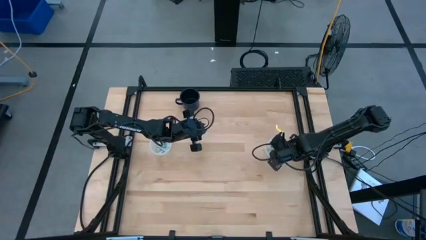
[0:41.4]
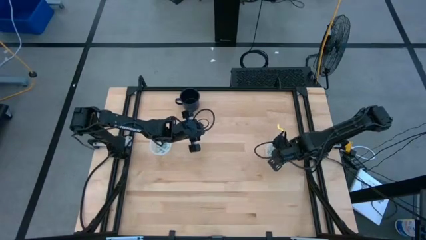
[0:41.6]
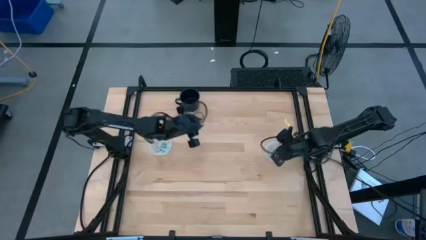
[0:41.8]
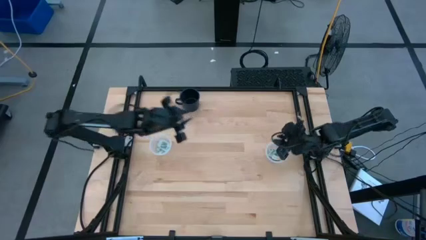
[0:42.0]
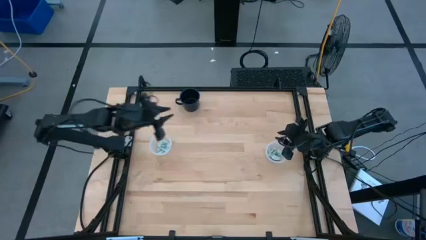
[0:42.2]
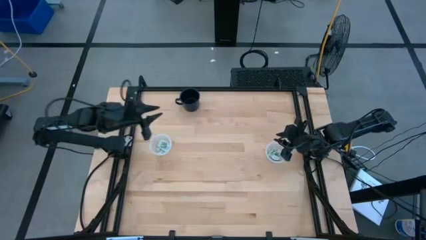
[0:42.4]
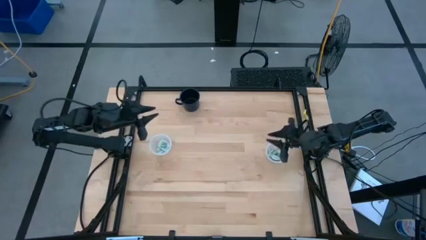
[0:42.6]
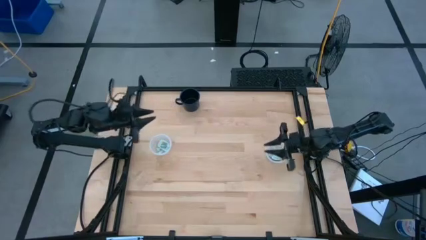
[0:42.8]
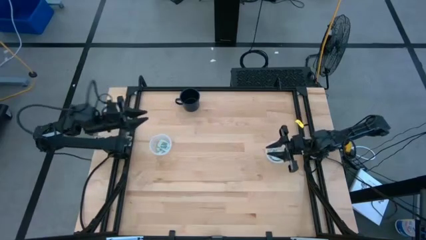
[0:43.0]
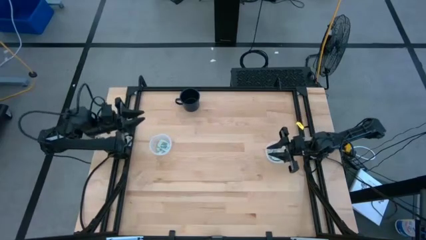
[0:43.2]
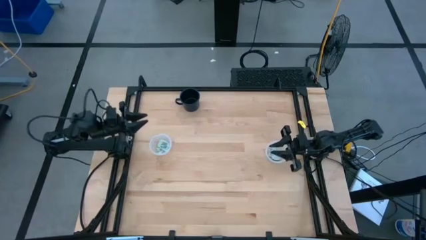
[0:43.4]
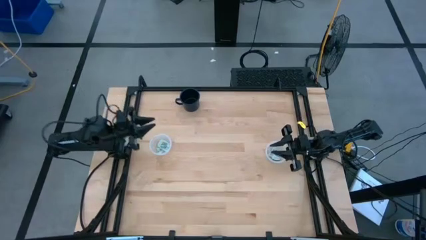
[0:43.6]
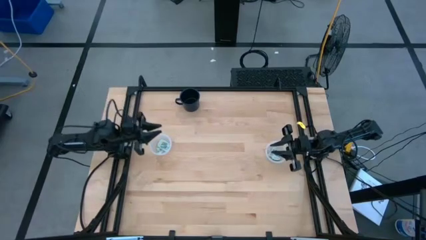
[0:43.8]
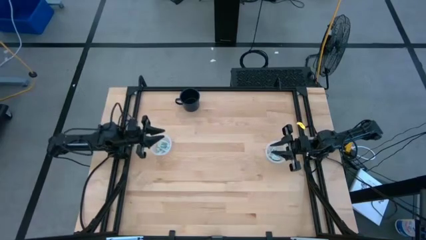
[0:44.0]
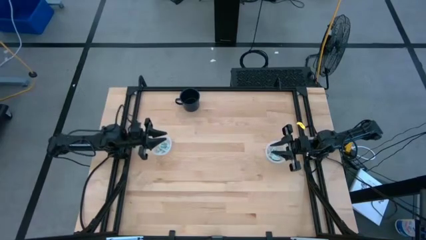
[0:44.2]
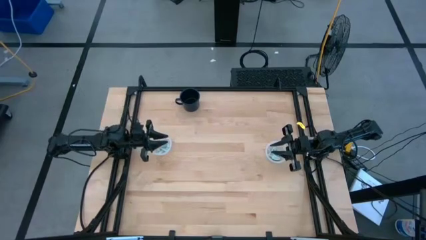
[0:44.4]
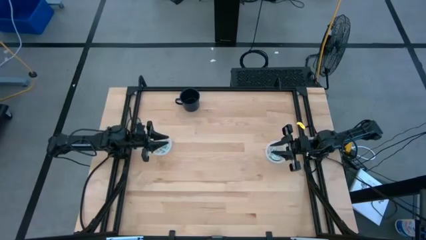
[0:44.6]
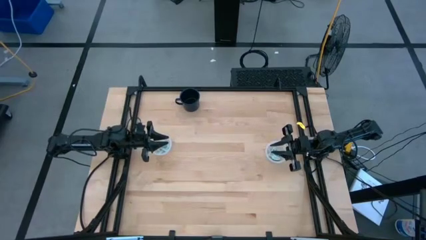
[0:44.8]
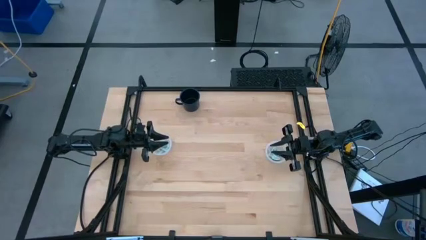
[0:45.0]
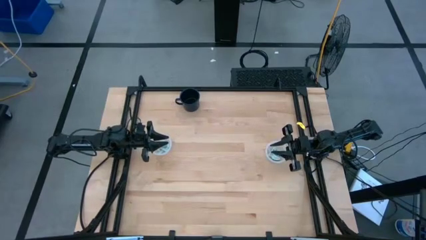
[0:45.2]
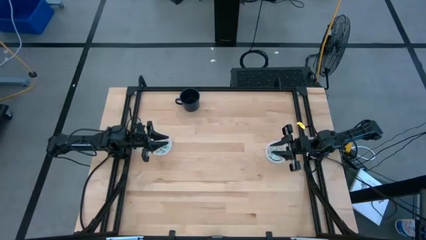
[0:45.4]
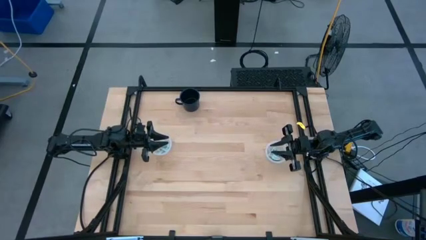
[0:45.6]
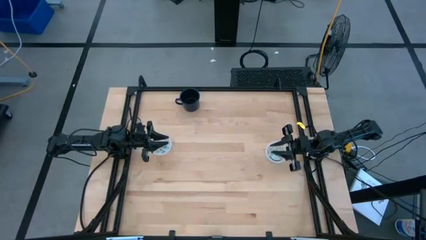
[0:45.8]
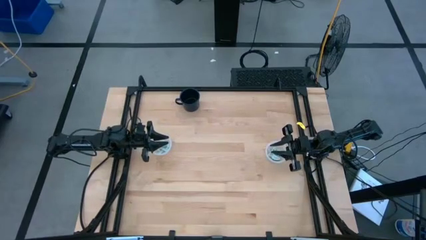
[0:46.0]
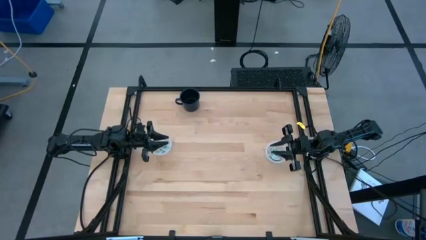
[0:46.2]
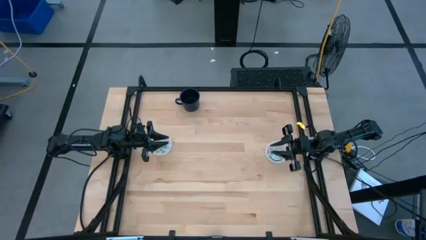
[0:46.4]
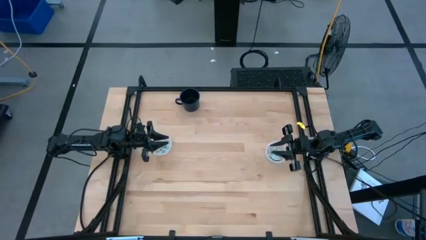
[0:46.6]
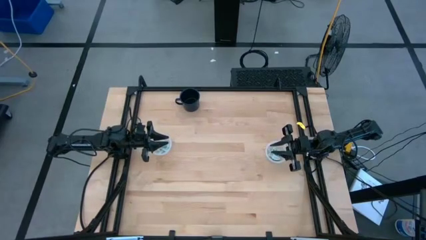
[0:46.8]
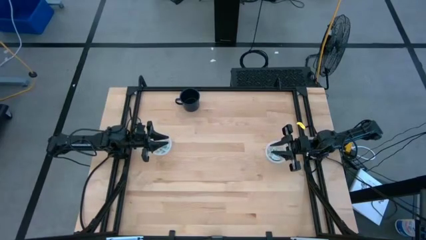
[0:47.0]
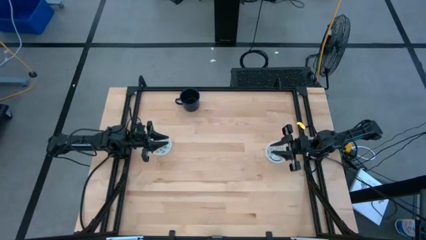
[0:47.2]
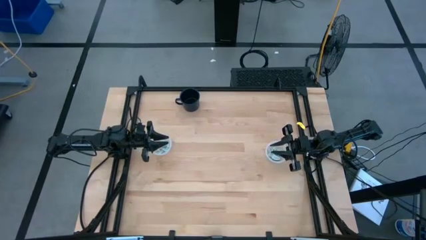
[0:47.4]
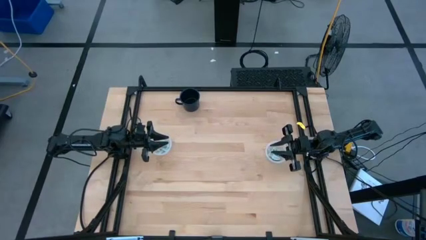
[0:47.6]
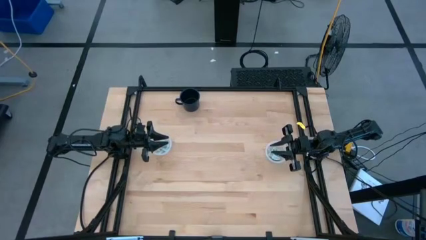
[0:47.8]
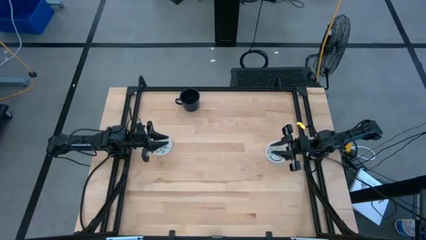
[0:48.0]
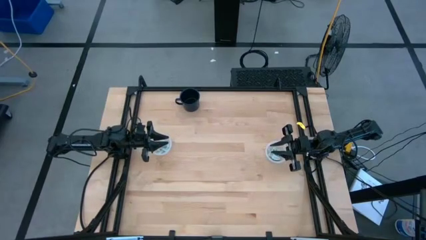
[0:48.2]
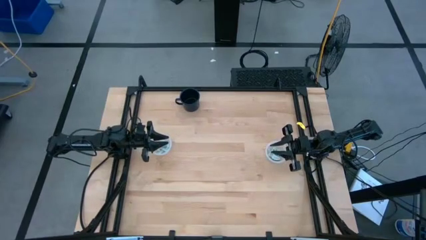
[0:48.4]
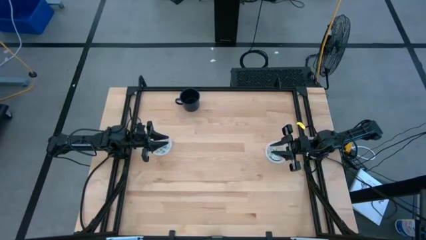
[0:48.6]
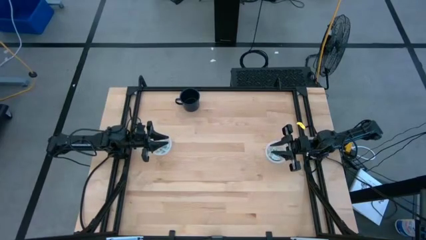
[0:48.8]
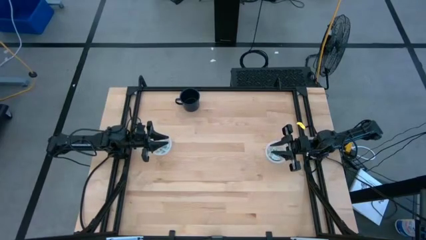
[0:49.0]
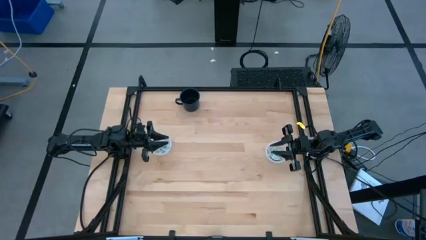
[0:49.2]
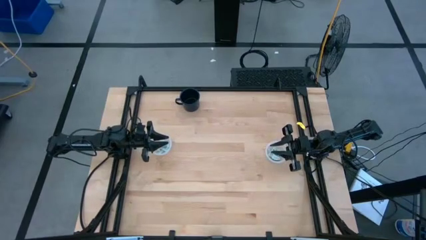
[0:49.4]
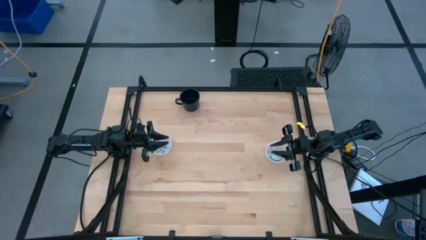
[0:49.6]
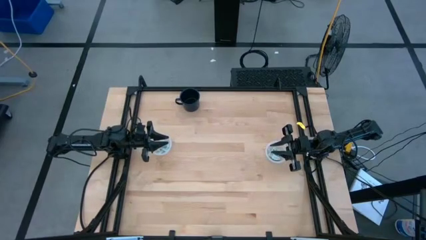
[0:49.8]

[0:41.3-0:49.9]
Task: Pick and place Stevia / Truvia into bins
Return to Home Position

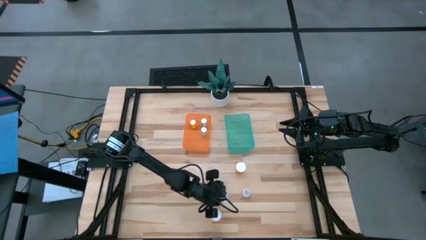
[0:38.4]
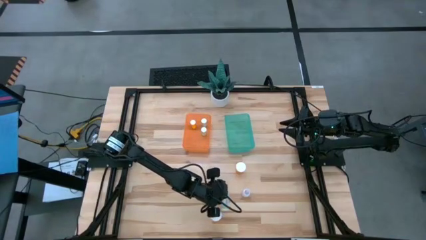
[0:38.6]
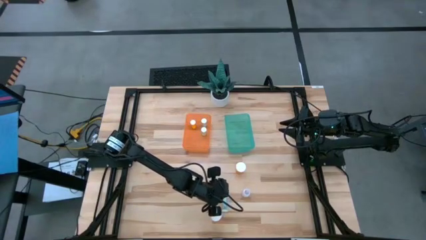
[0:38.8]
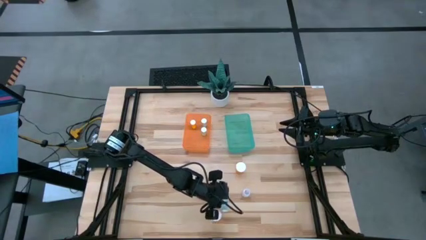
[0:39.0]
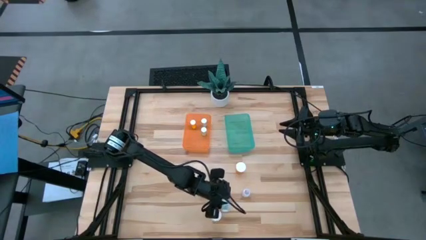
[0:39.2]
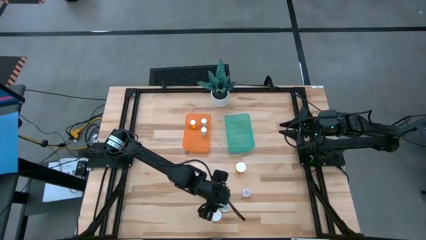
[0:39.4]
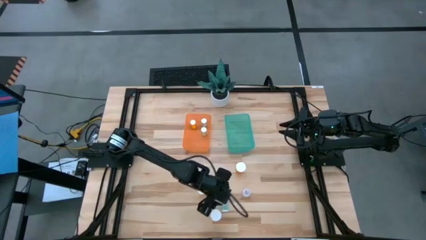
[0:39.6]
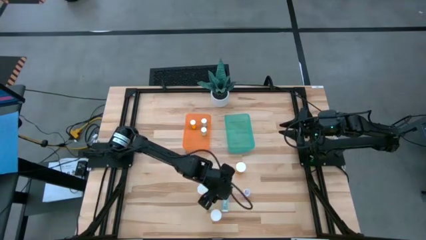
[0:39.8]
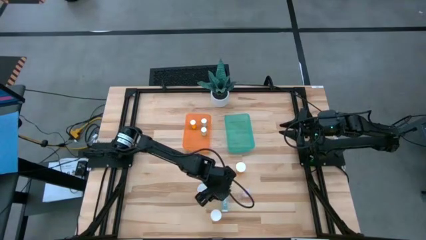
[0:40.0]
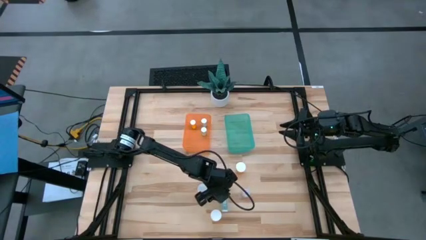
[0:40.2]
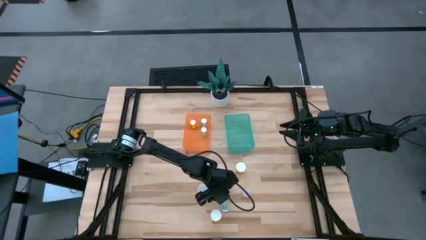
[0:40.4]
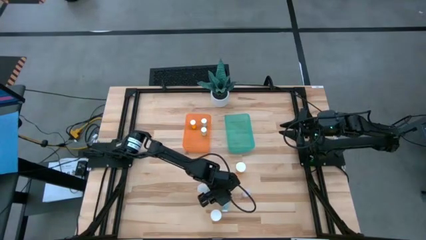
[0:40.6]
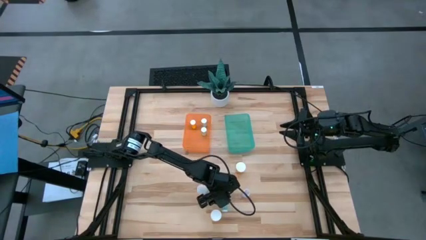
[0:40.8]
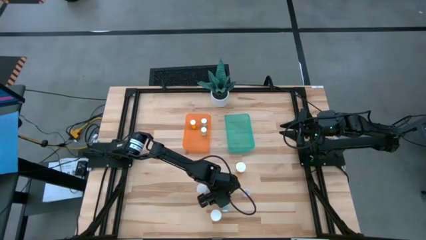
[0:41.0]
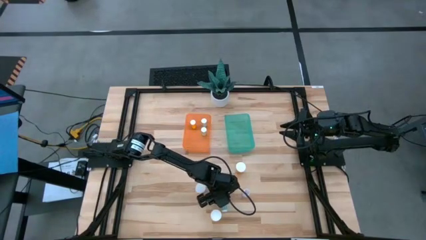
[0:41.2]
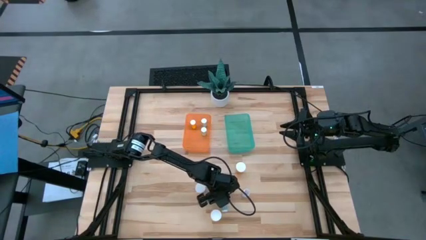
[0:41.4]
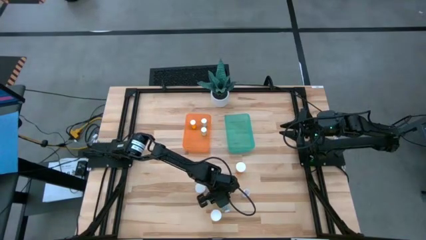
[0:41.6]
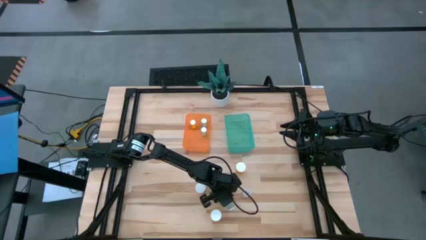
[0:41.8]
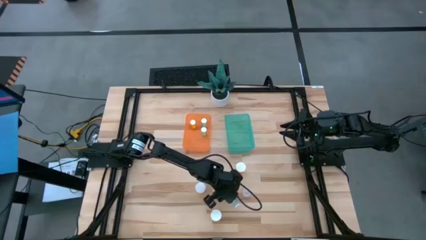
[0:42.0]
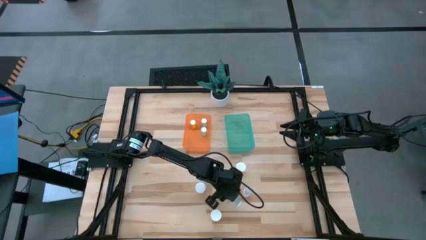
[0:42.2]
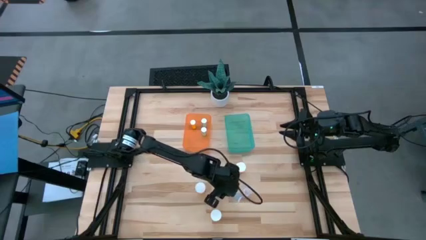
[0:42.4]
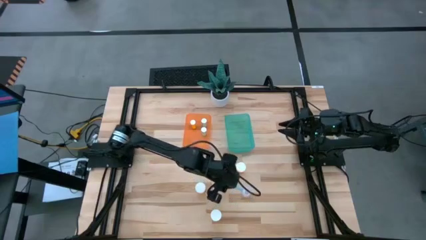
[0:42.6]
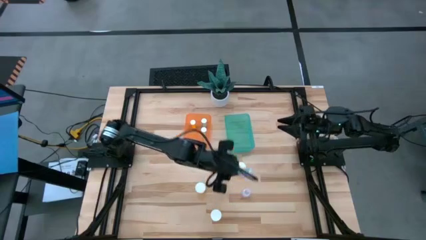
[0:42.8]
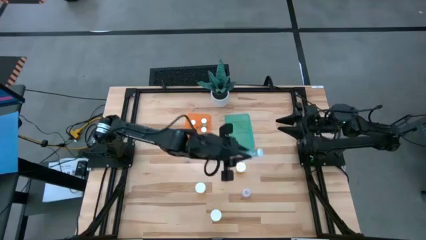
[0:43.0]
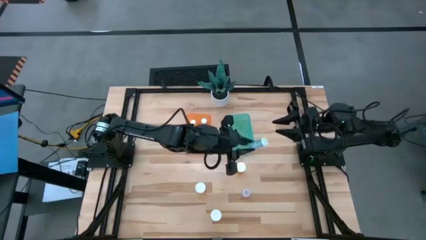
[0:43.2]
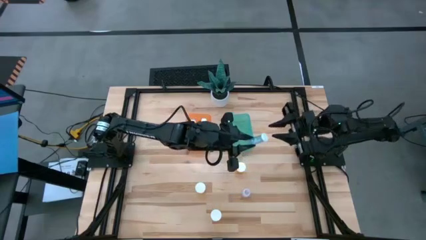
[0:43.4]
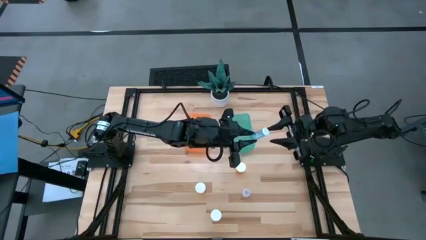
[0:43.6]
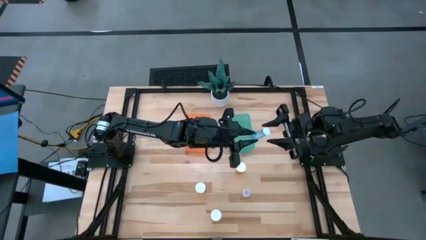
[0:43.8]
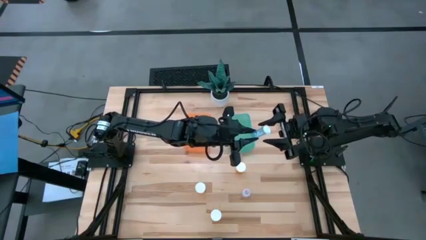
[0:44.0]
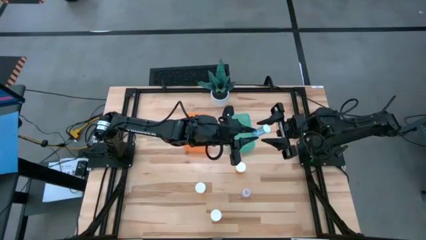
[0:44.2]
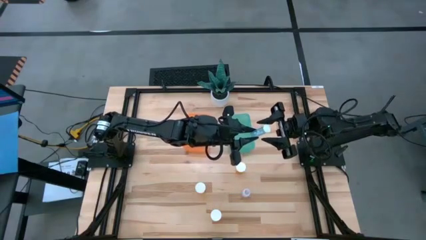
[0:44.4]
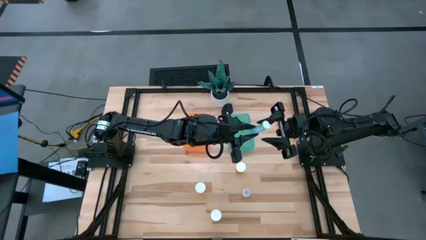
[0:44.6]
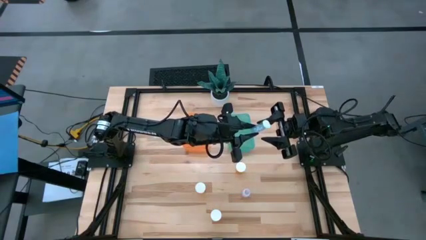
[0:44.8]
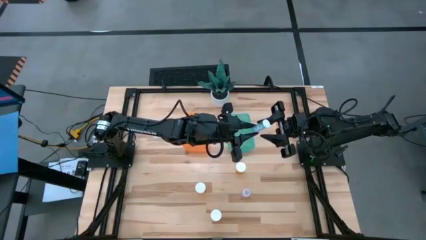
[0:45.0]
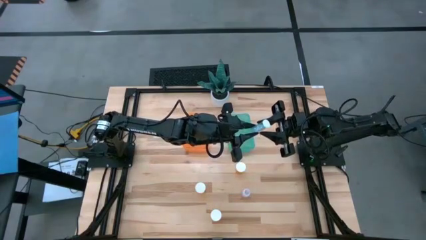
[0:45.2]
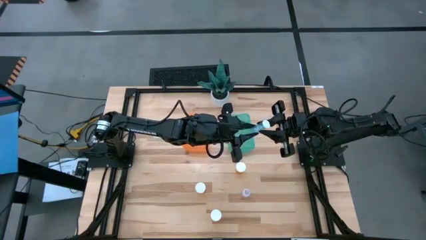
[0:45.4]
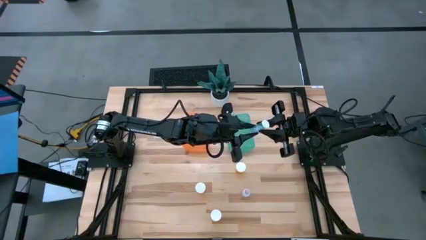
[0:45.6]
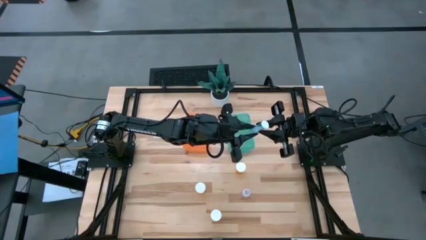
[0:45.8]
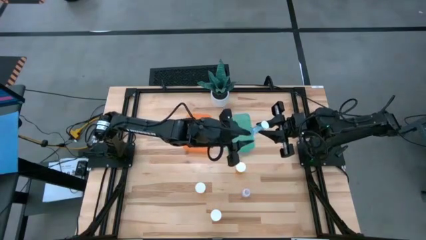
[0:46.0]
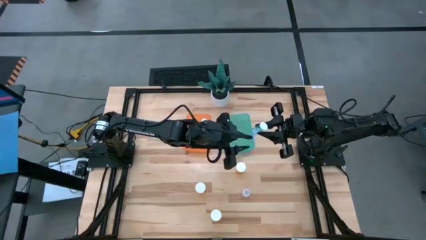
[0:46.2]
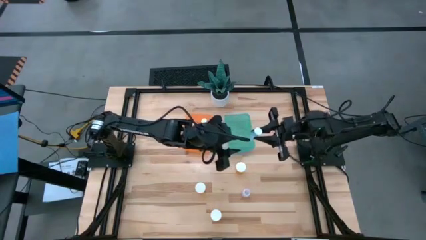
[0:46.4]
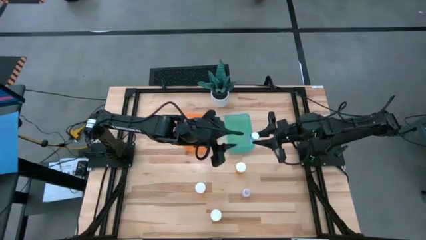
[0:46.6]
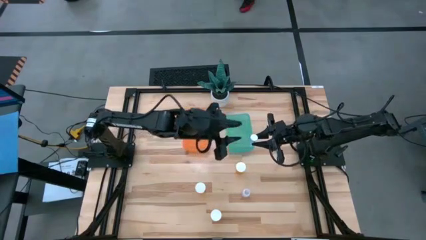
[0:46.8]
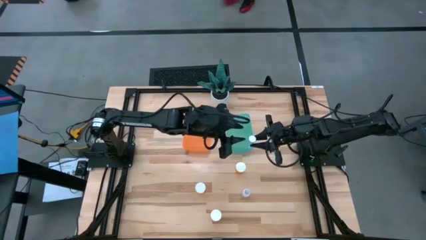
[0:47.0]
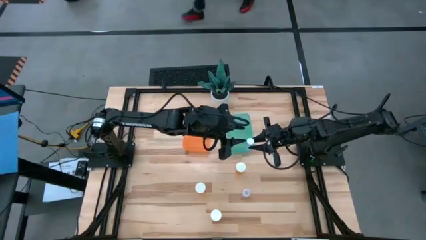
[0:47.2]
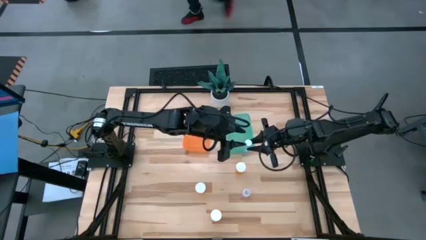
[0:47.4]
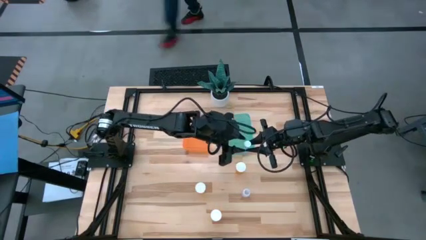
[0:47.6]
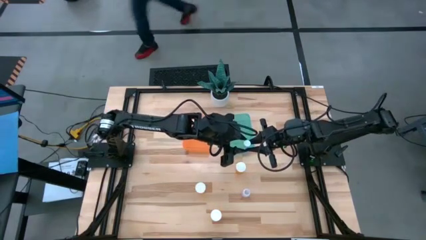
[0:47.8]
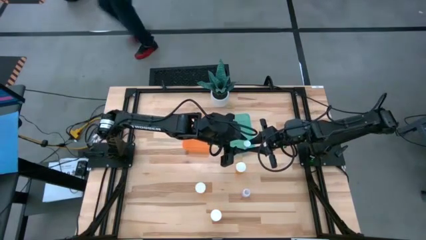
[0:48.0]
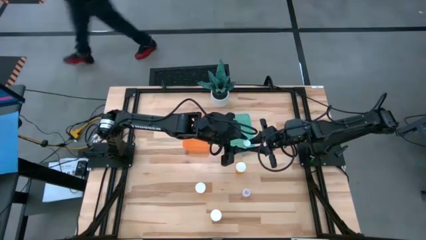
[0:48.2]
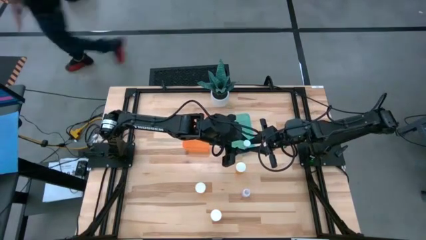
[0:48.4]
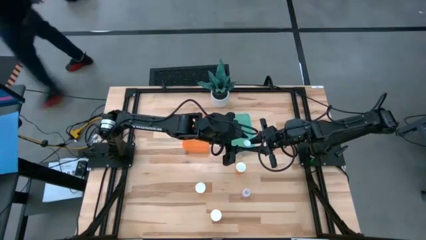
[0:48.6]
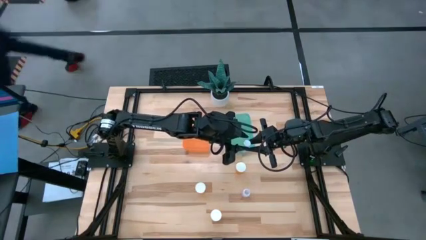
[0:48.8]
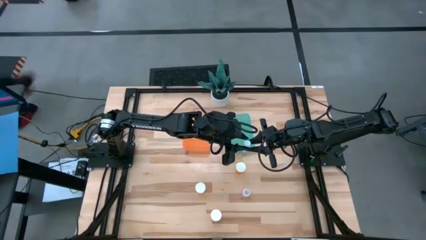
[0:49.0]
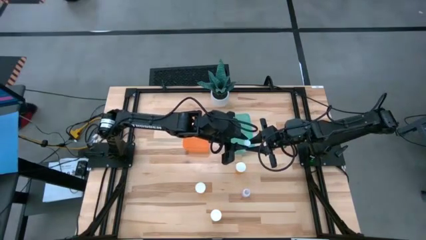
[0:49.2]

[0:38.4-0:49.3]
Task: Pick and place medicine bottles into bin by pill shape (circle, oval)
Put the blue pill bottle into the orange bin
